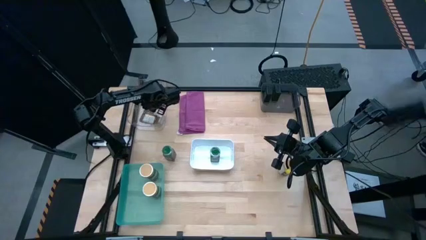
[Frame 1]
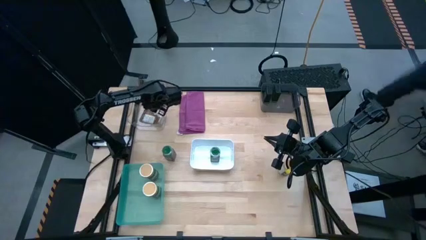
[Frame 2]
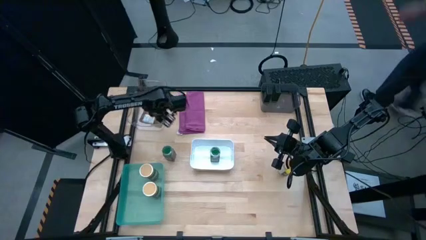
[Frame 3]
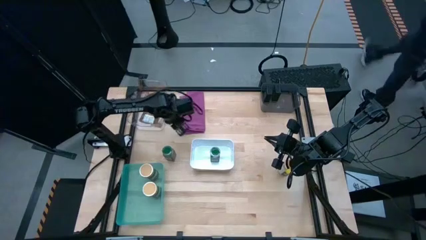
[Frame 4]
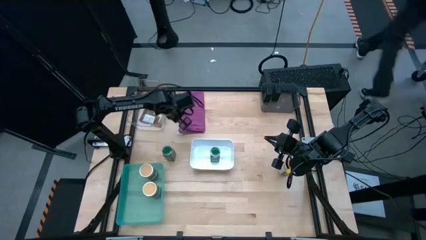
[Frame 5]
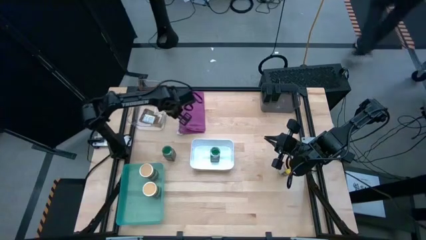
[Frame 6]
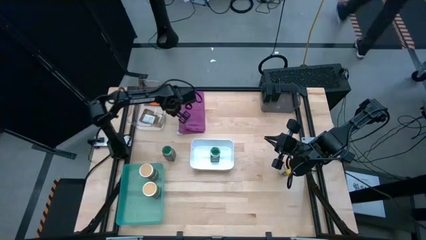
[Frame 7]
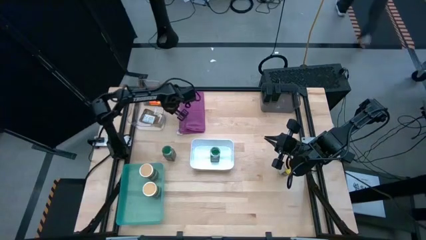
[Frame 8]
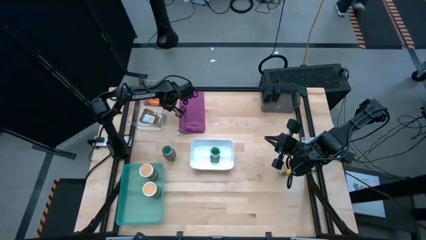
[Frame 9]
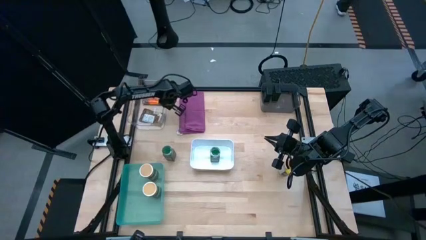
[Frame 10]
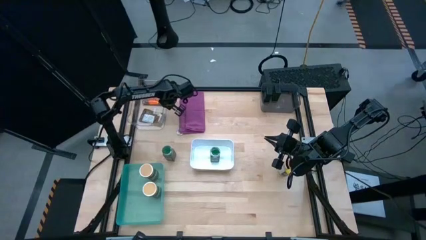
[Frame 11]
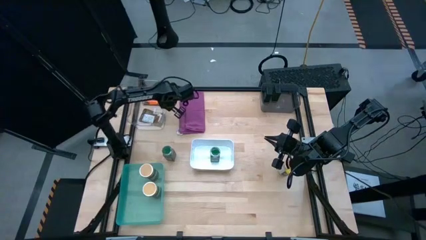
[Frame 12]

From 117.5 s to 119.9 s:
Task: Sort spices by type
Adjust the transparent bin

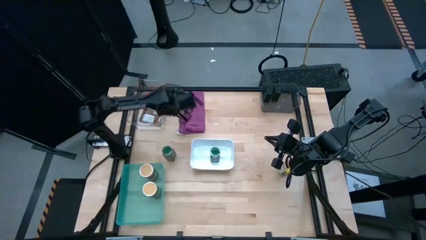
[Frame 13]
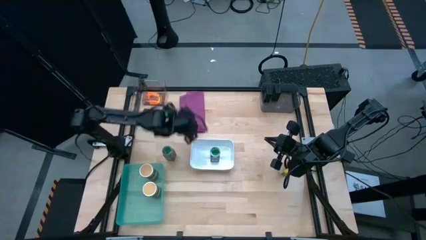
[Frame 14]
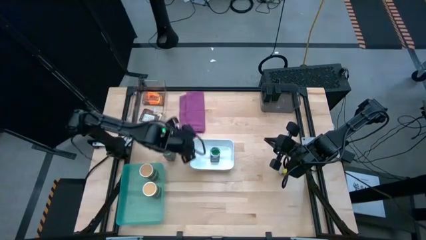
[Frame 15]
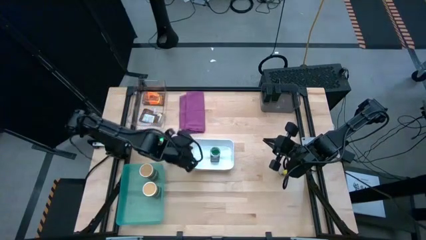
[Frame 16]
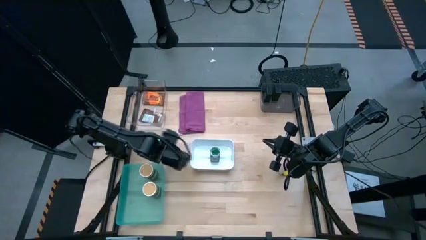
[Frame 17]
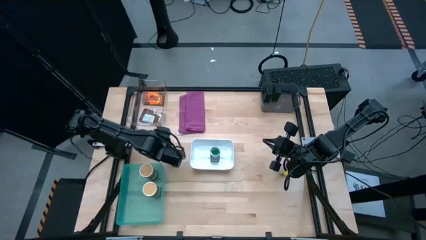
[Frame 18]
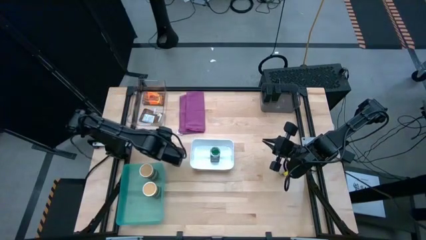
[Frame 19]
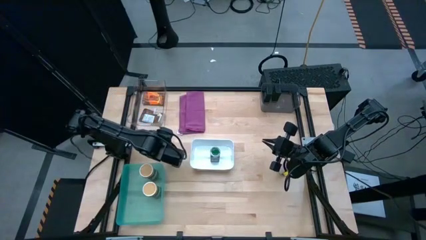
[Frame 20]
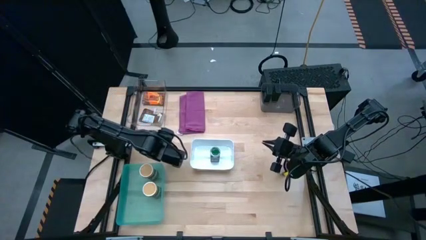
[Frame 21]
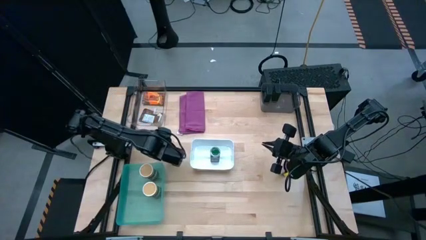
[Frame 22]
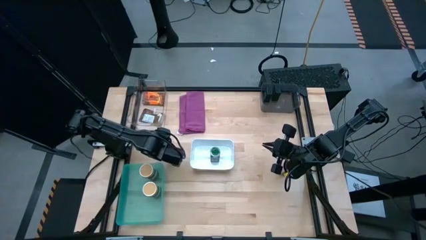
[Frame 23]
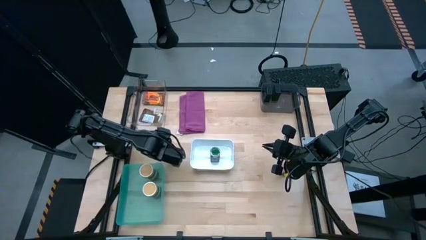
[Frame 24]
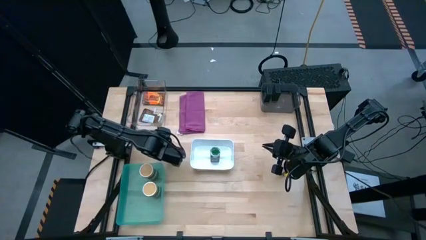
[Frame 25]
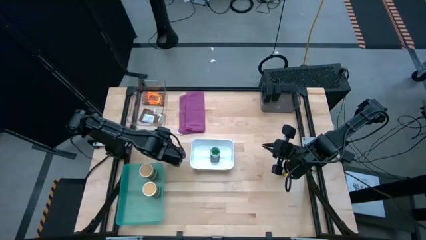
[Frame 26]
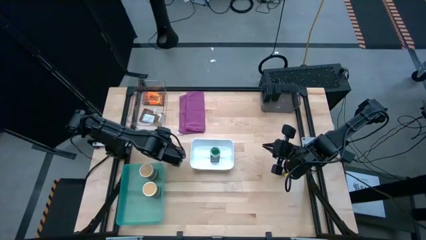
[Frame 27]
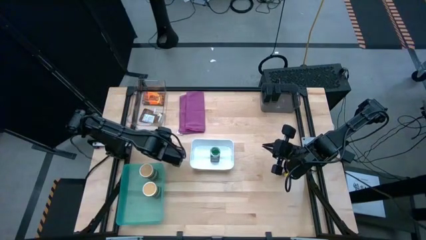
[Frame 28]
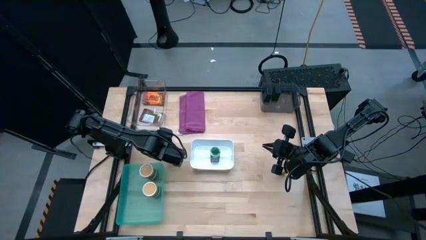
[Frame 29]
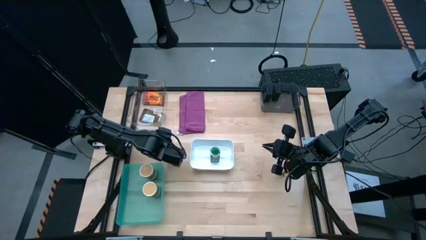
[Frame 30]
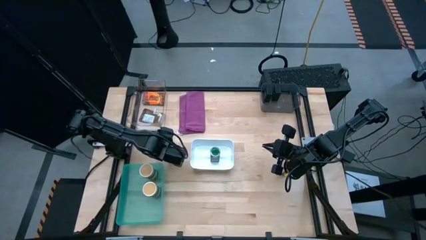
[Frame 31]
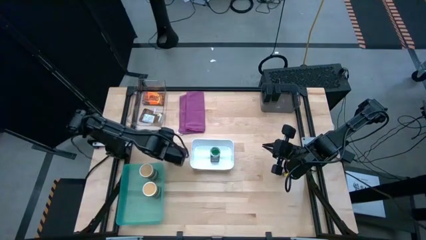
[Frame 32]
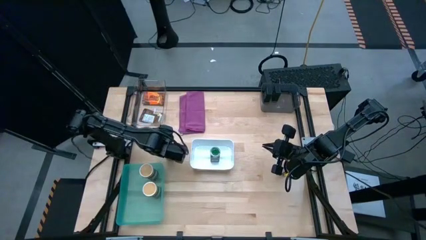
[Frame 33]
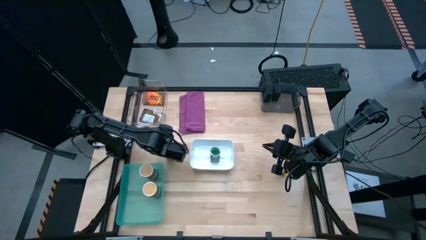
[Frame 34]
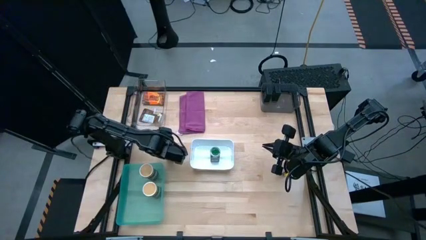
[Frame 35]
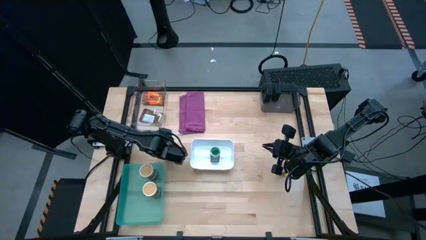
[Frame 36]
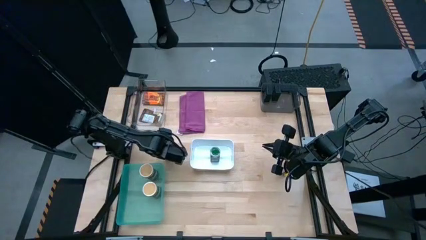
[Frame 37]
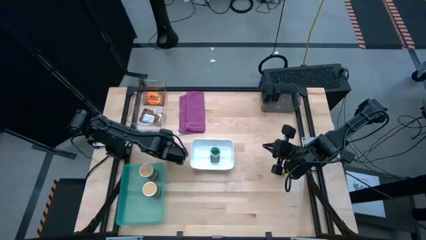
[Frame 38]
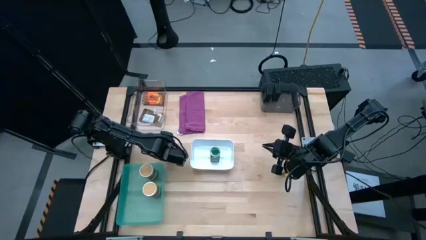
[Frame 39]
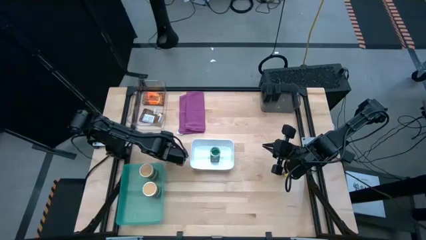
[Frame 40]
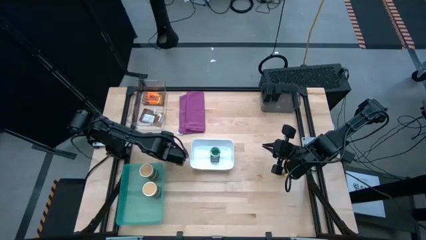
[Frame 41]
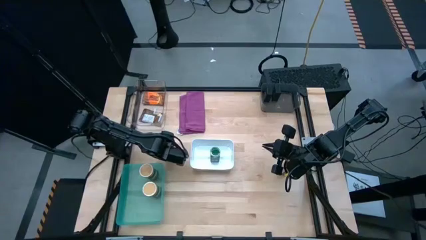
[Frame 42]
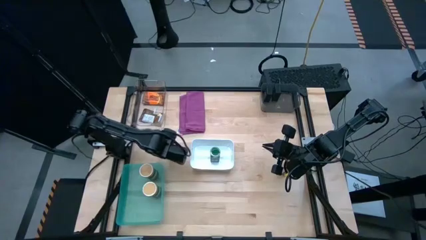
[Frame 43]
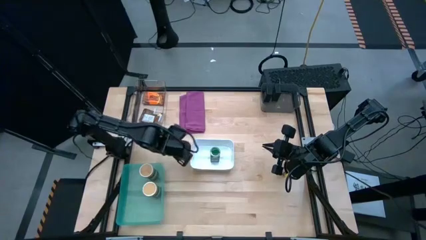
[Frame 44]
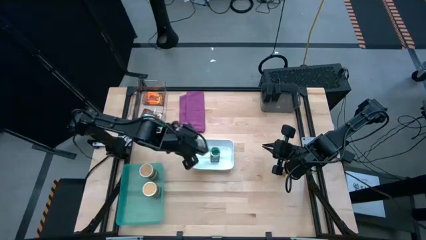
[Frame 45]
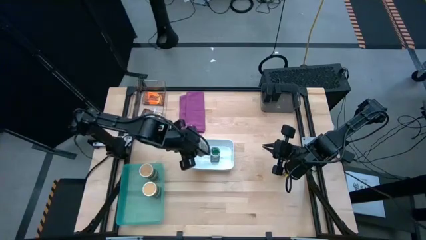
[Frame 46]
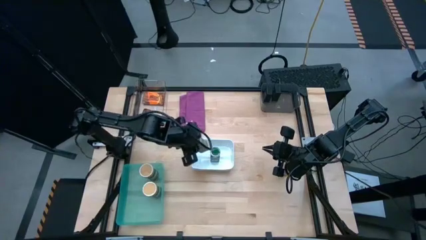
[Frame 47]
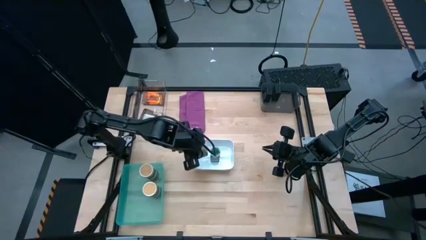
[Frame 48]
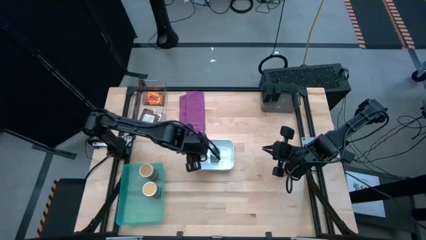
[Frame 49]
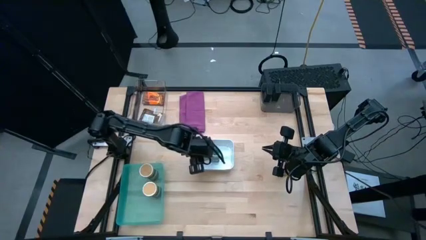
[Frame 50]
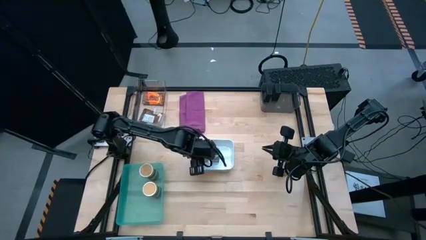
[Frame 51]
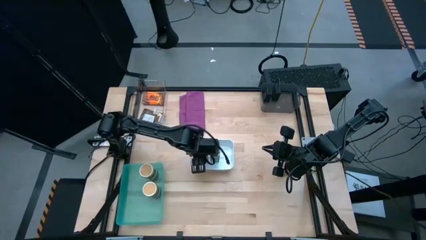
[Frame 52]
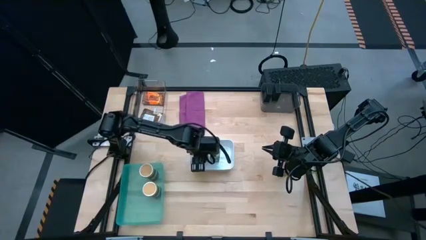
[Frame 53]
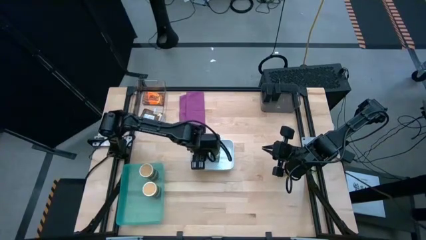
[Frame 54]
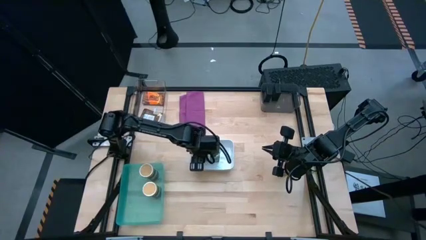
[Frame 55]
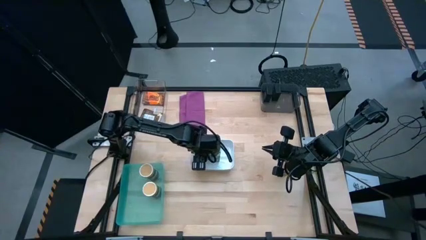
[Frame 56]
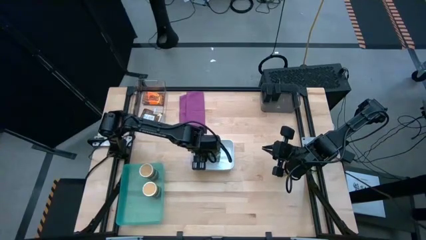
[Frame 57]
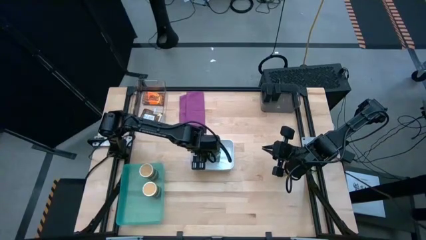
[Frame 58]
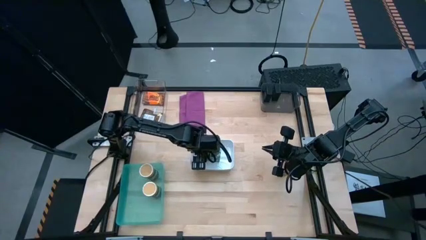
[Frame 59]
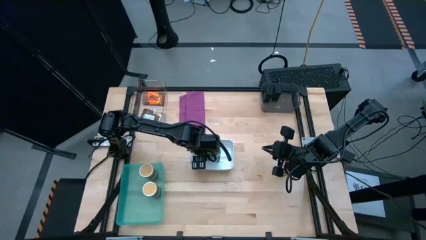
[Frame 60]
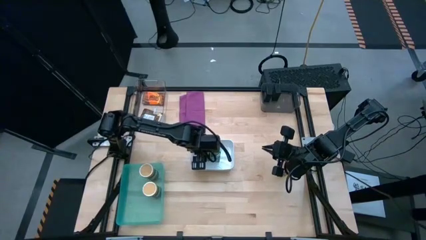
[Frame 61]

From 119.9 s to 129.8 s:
Put the green seasoning bottle into the white bin

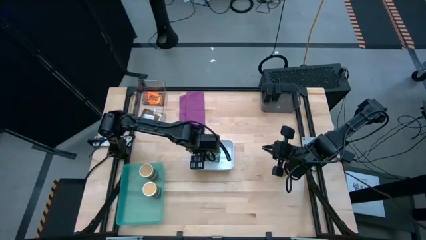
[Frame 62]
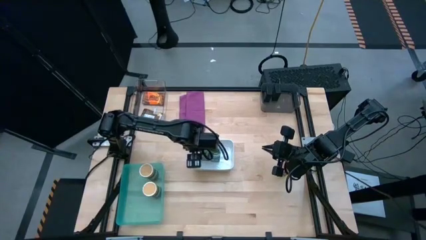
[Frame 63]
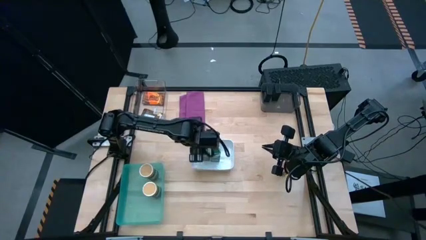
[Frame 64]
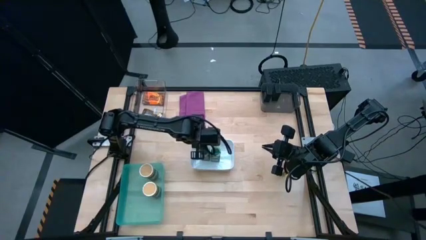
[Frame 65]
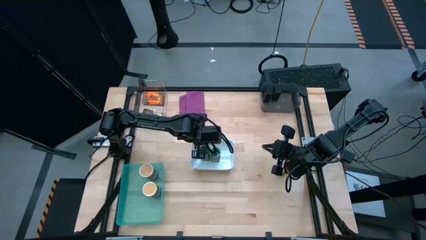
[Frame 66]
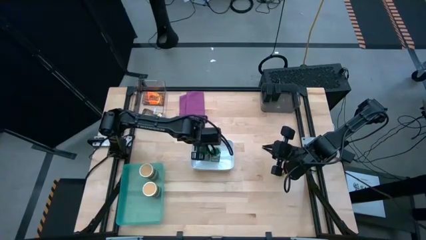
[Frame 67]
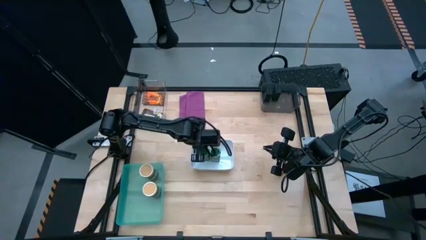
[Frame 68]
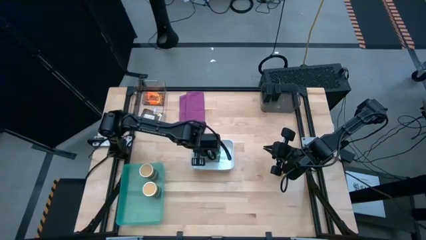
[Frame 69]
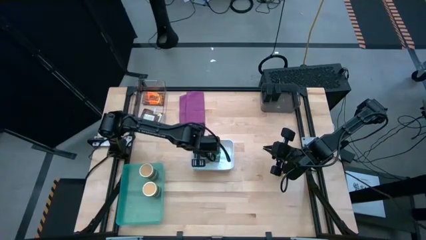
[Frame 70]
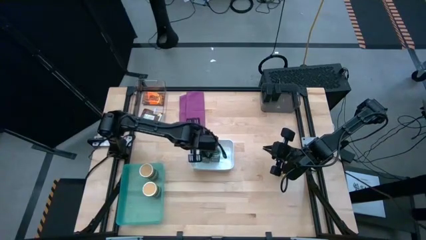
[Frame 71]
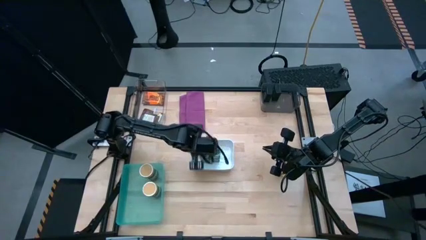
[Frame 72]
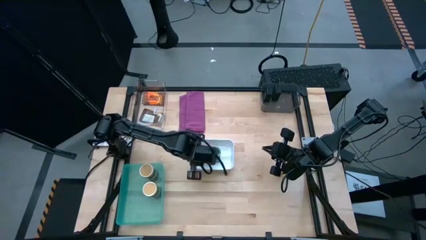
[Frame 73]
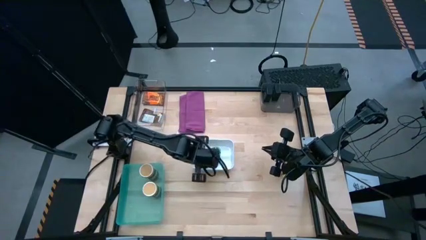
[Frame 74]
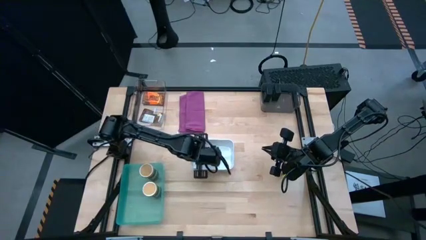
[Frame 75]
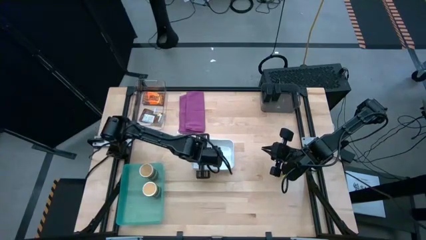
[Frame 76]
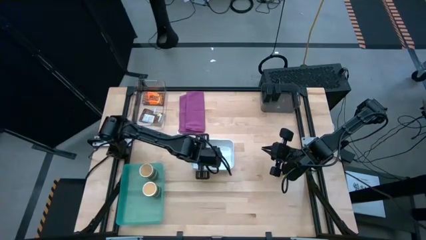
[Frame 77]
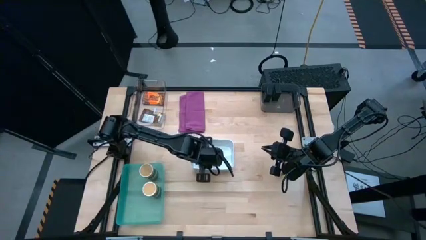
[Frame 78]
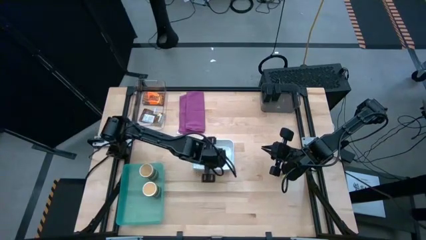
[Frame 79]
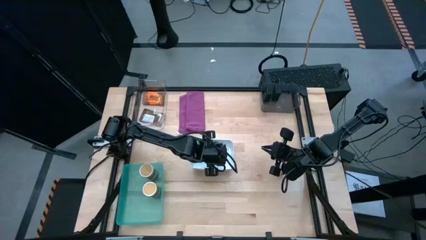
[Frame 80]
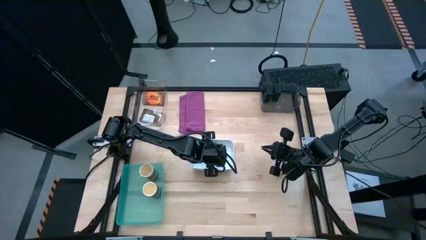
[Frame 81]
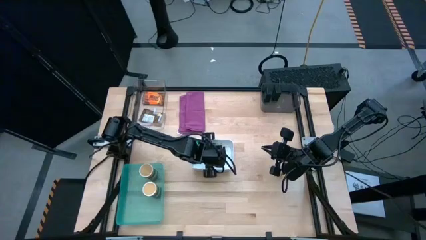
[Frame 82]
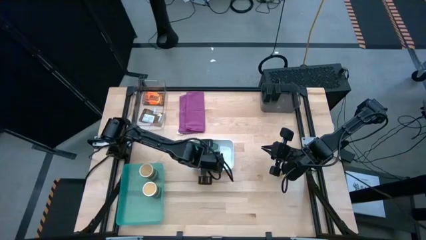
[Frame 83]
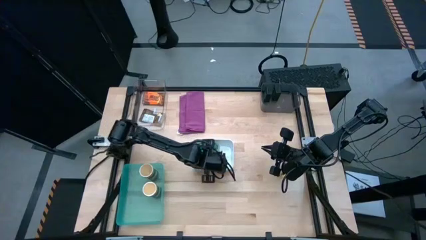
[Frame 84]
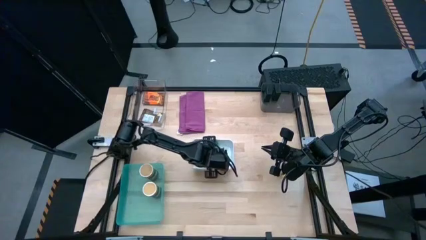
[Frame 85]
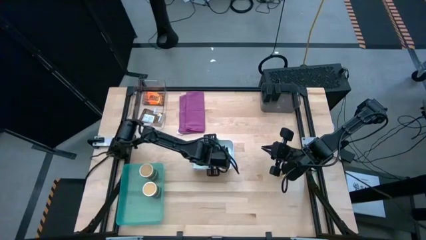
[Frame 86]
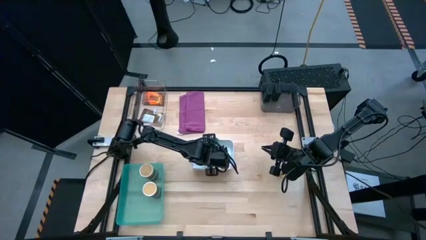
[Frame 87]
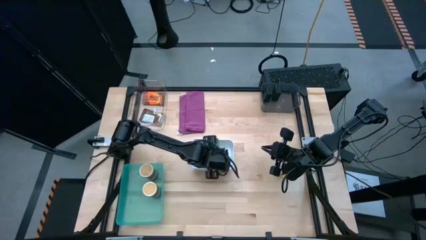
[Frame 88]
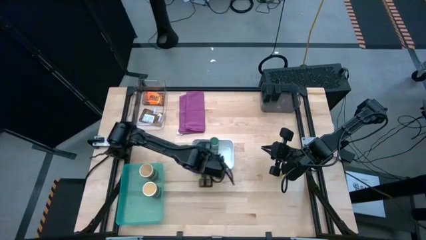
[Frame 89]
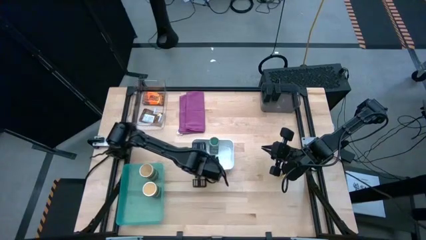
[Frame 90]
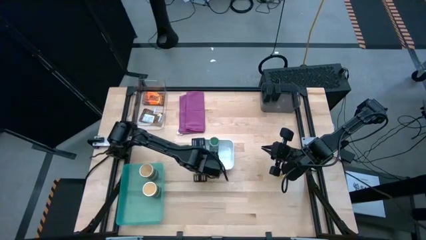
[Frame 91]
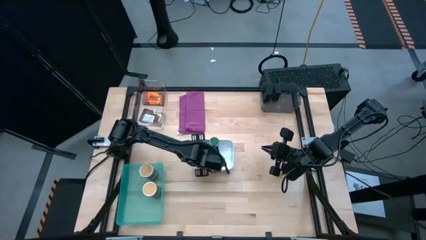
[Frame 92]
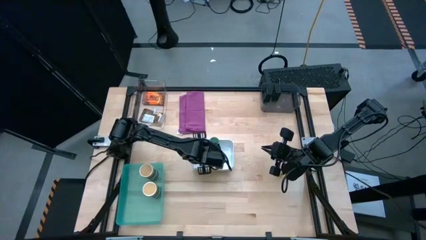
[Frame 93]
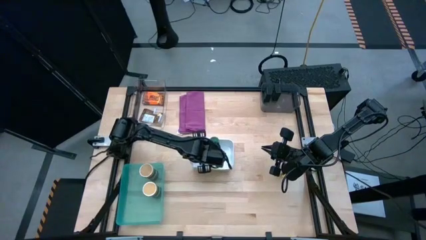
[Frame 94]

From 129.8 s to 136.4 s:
Adjust the green seasoning bottle in the white bin
